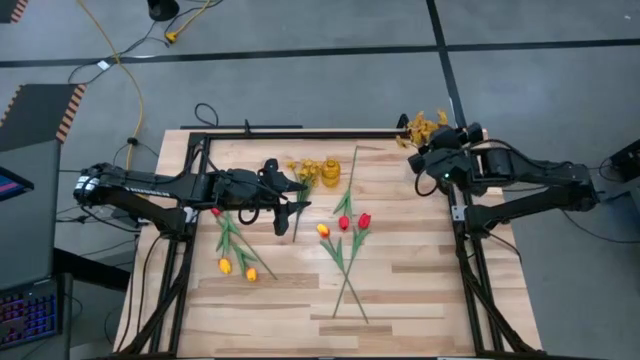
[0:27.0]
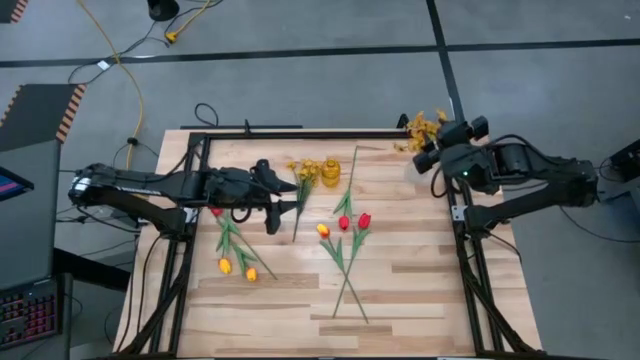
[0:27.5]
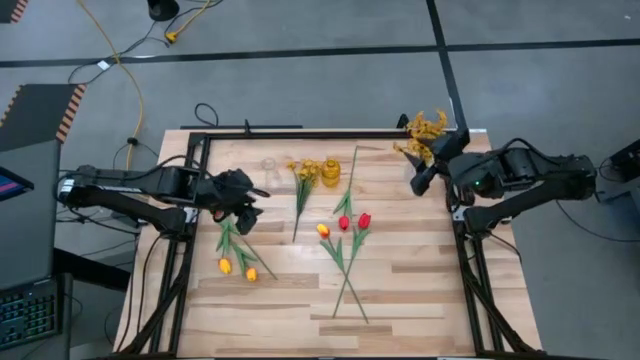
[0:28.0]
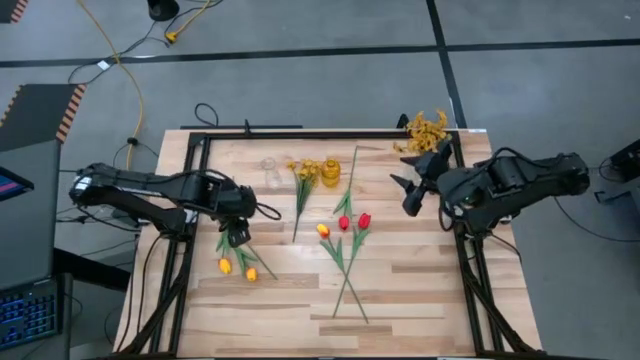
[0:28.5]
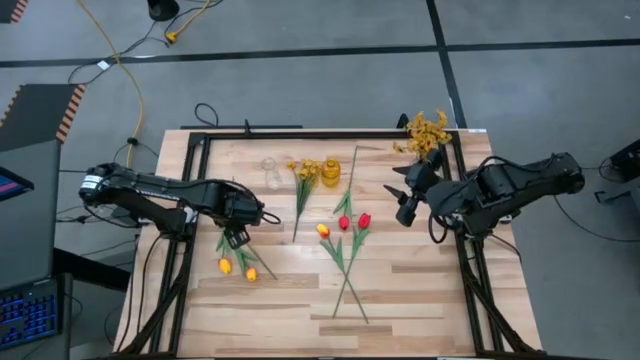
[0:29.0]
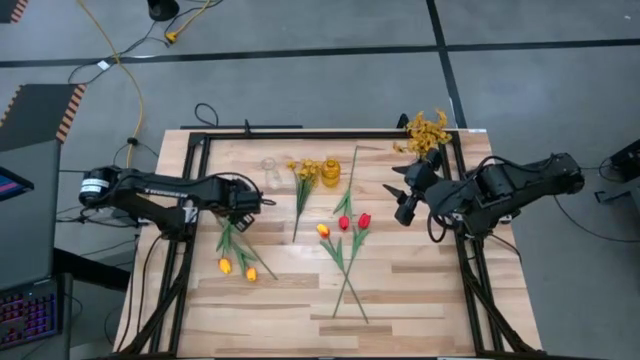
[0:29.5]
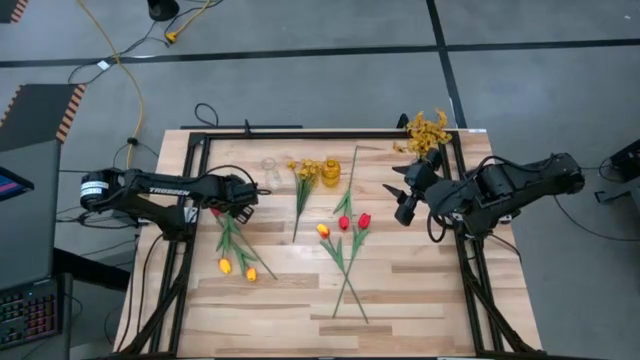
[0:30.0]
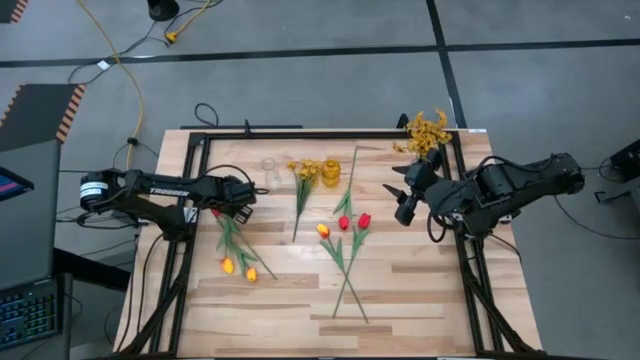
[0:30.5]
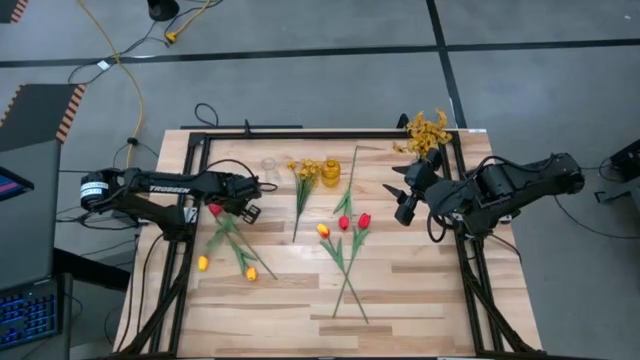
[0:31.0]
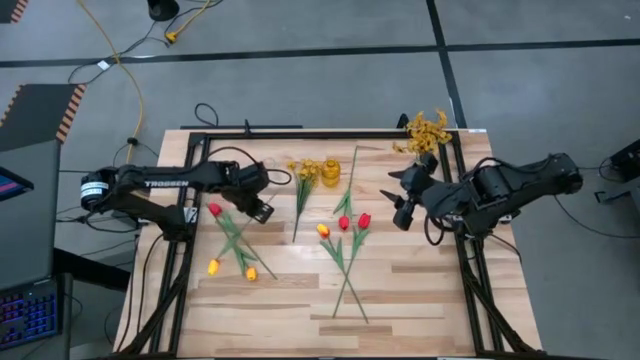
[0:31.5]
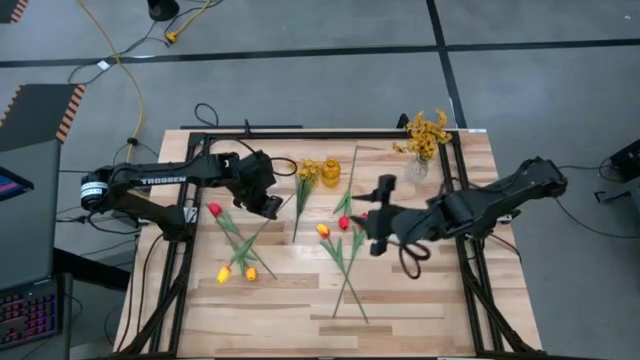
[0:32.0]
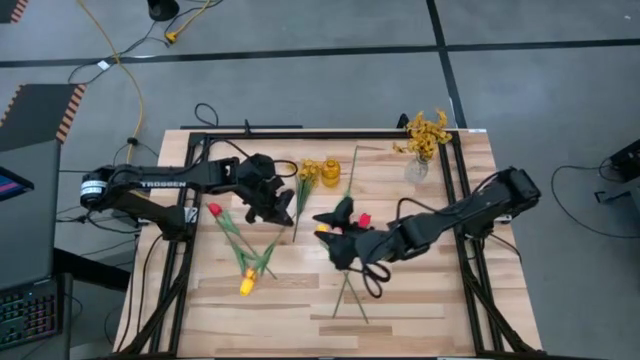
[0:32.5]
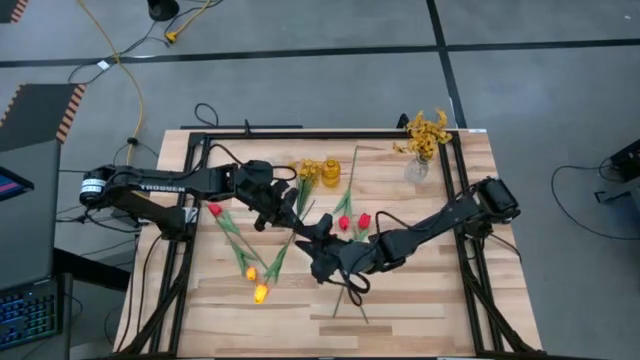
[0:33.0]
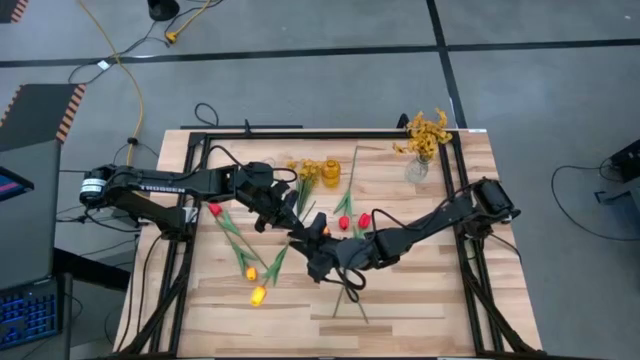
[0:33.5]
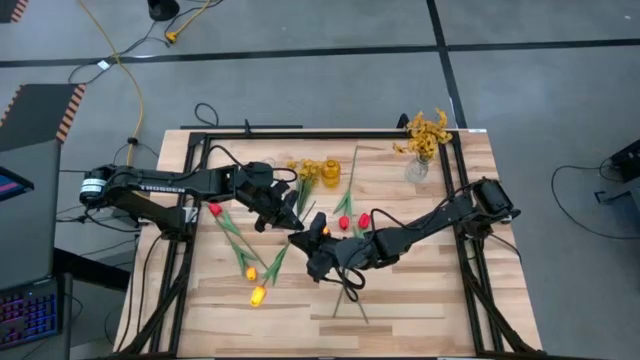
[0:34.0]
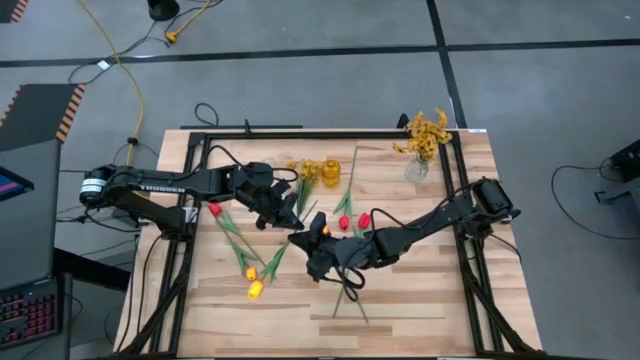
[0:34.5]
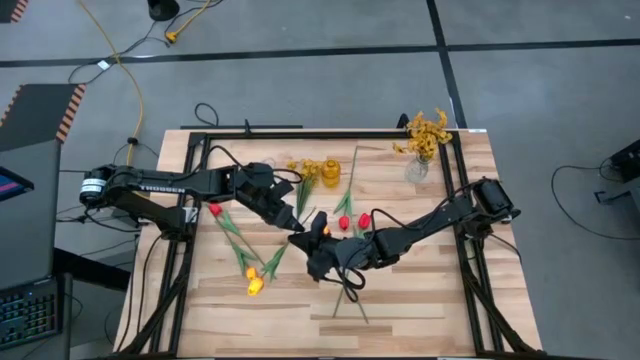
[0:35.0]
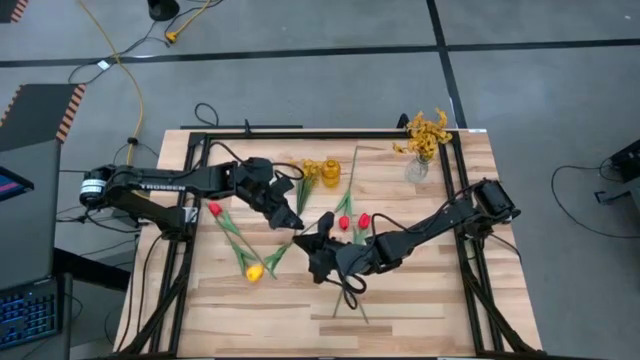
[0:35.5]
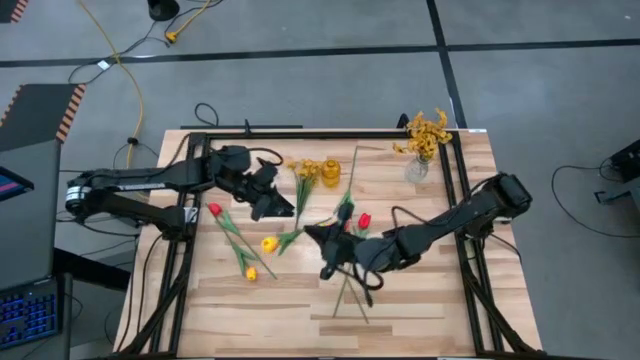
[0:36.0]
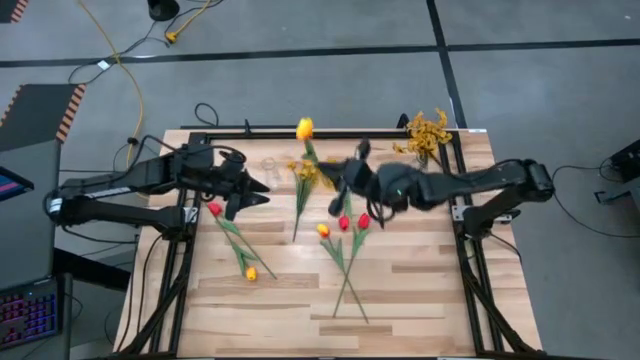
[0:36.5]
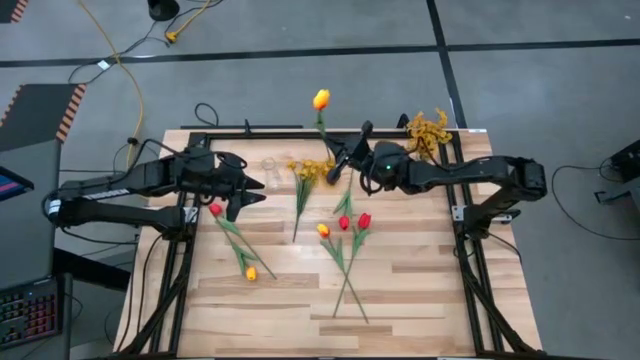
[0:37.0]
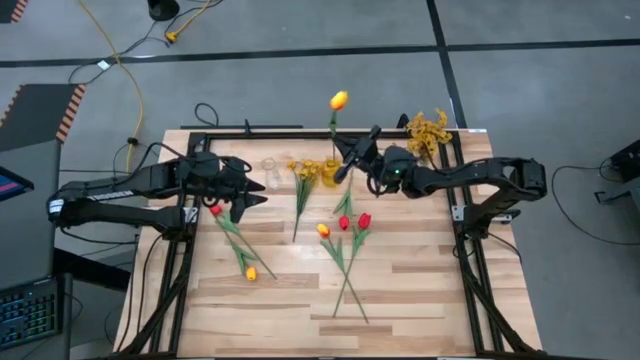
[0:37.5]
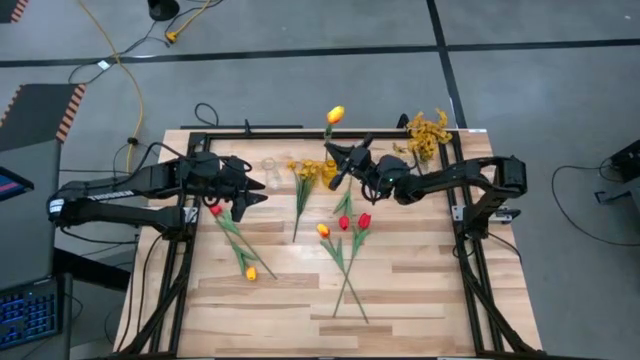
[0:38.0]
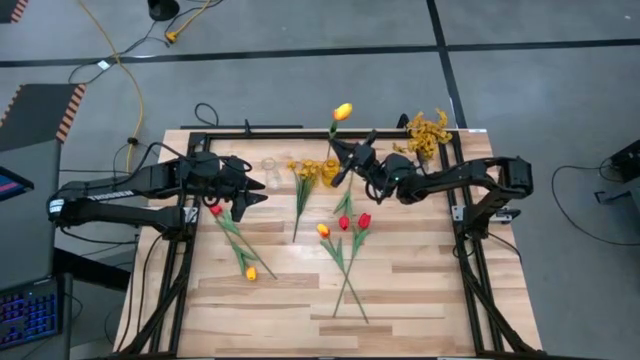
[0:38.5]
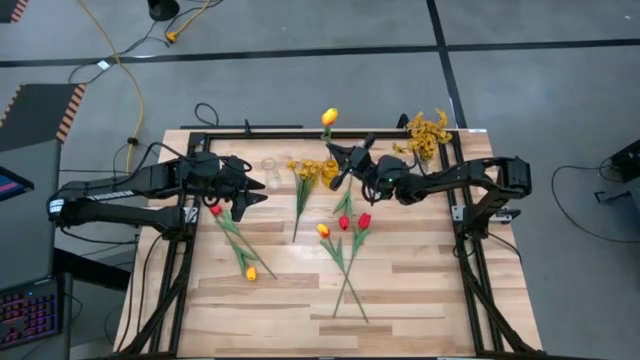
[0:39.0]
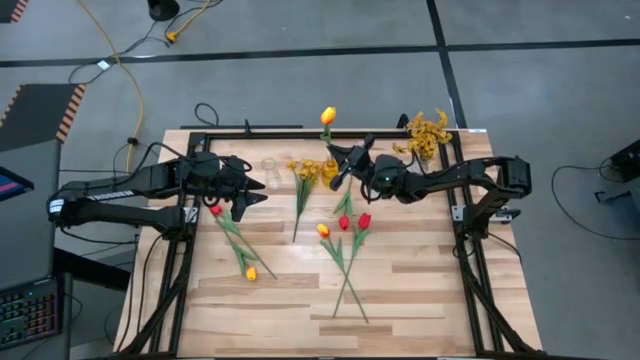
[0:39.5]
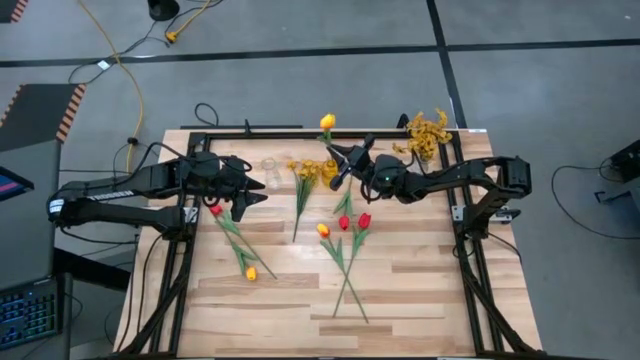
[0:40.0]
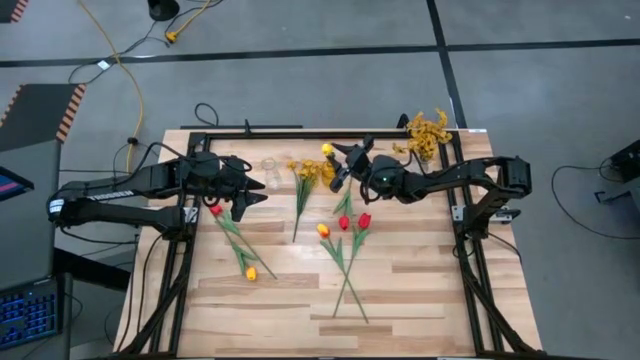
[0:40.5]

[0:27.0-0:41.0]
Task: Sort flowers into vase by color
Put the left yellow flower into the yellow flower vase

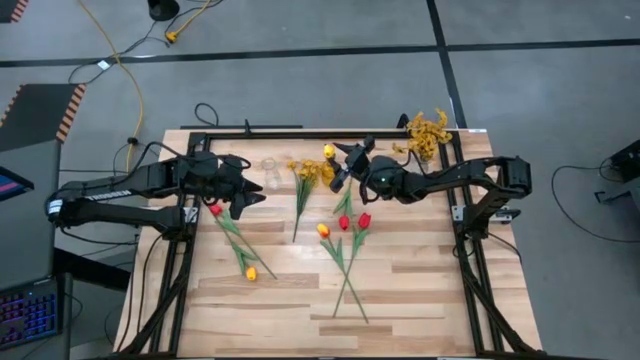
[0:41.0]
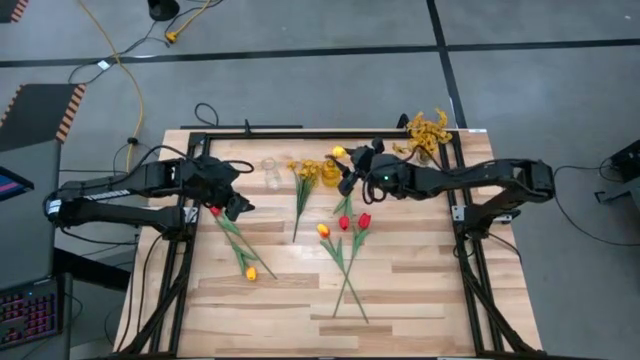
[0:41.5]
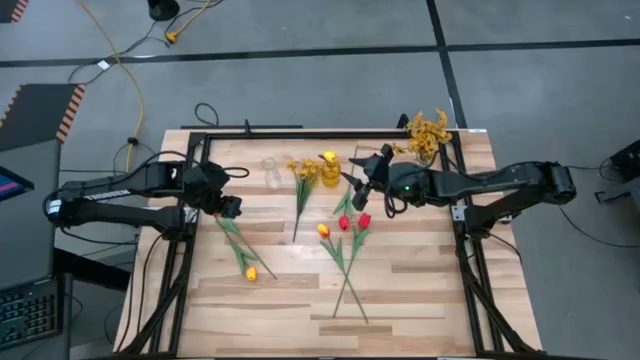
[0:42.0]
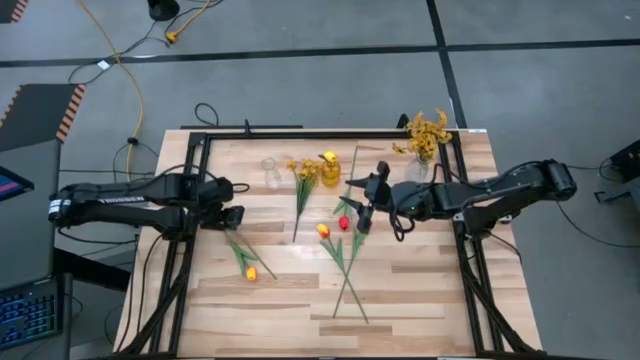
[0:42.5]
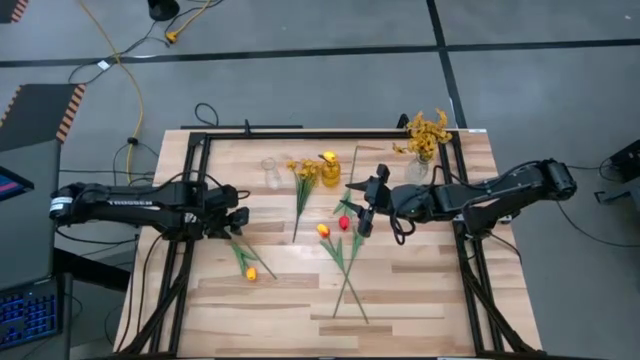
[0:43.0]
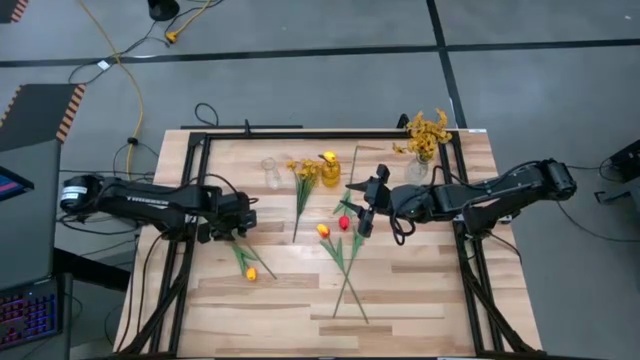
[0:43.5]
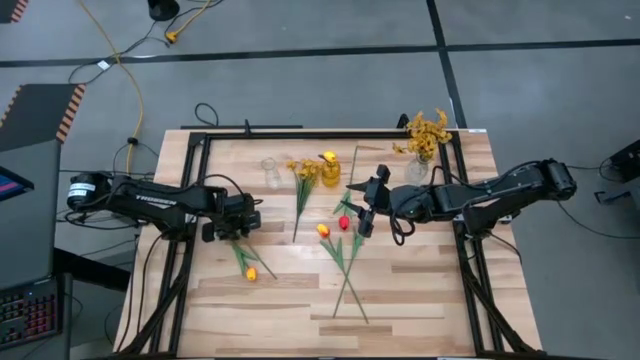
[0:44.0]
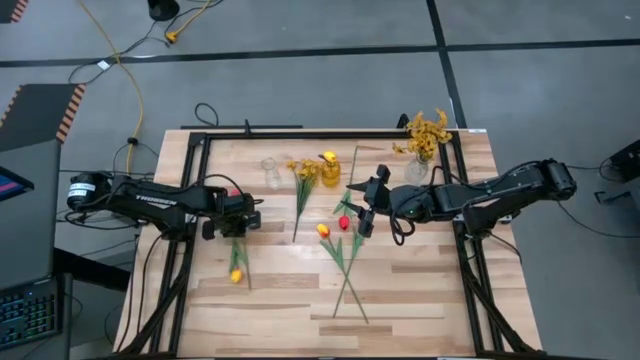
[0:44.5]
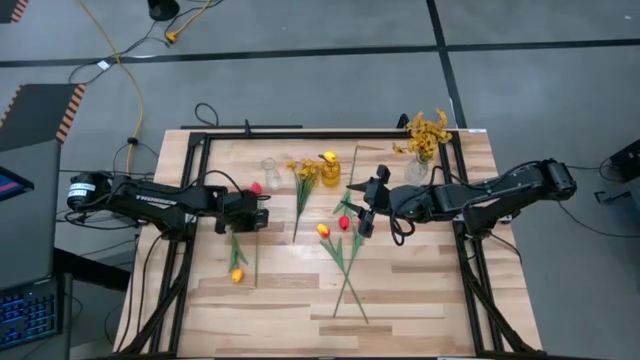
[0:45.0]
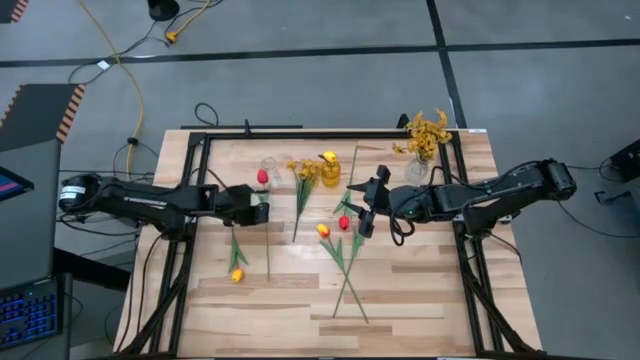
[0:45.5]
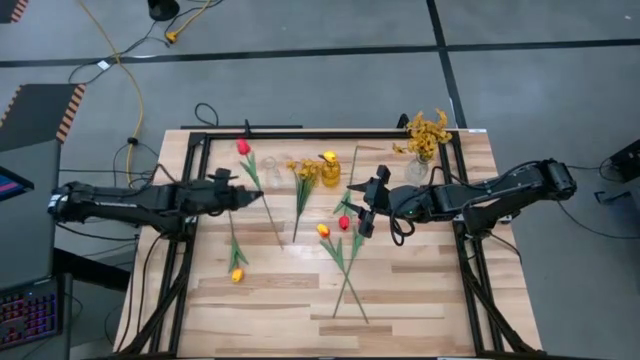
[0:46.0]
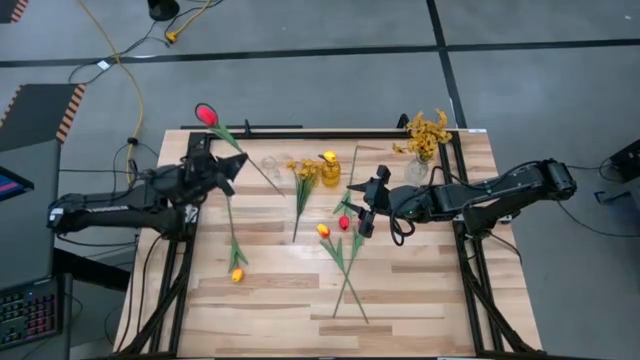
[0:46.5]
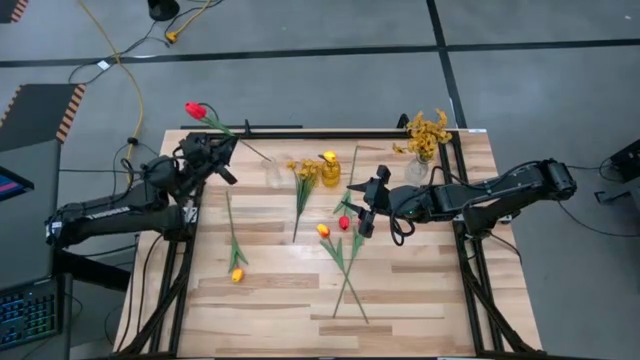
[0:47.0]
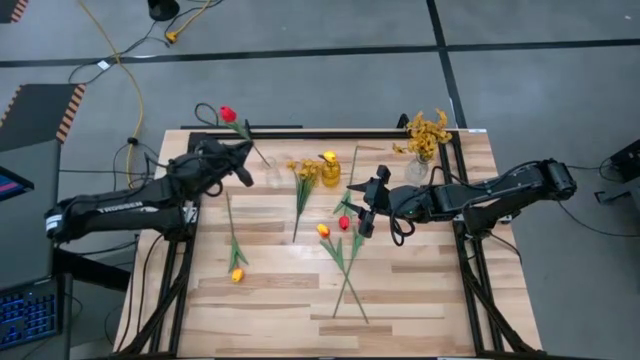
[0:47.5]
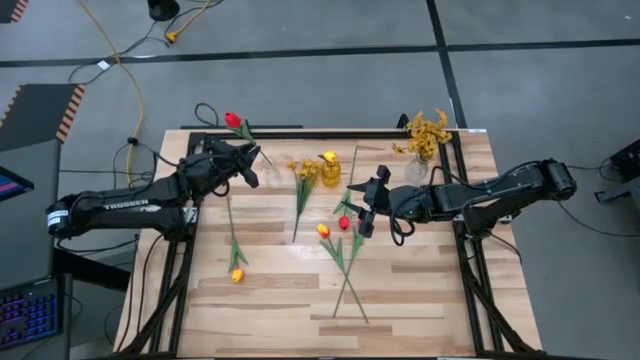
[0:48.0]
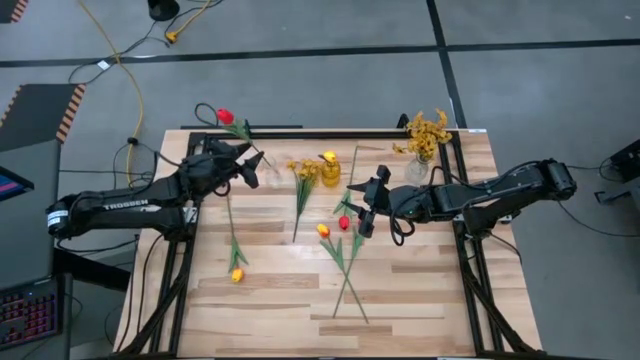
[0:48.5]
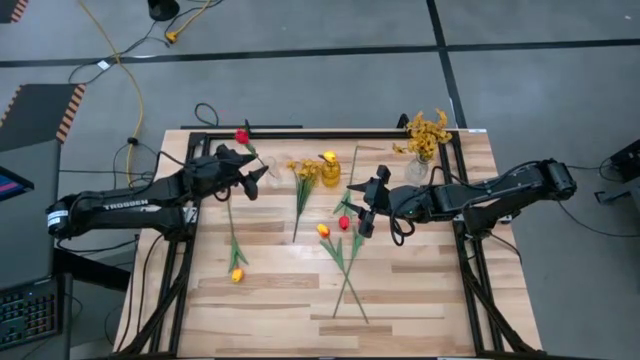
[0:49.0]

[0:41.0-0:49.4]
Put the left red flower into the left transparent flower vase
